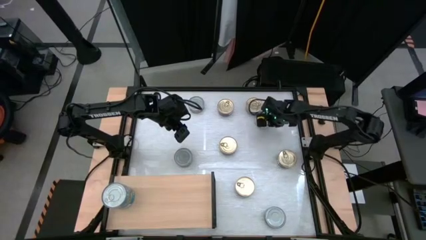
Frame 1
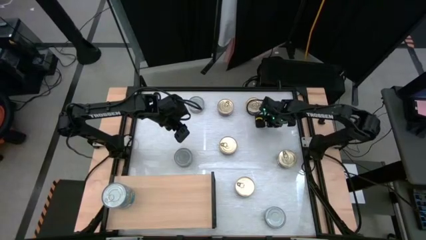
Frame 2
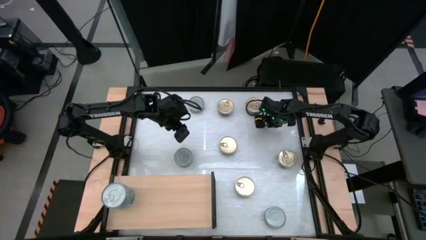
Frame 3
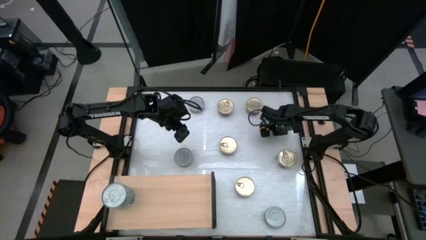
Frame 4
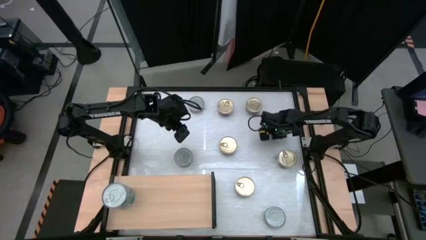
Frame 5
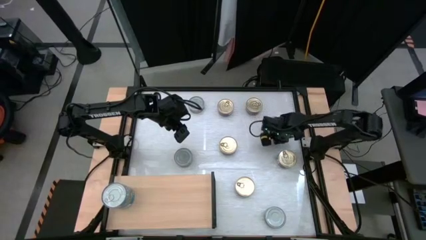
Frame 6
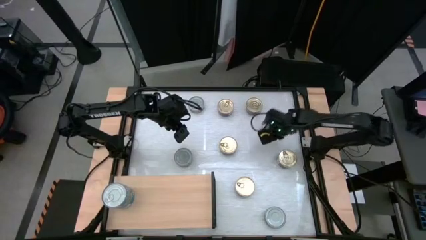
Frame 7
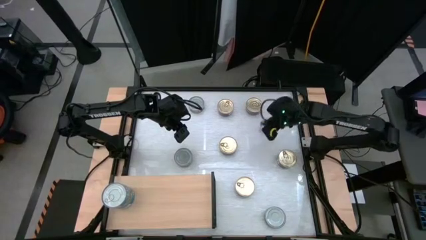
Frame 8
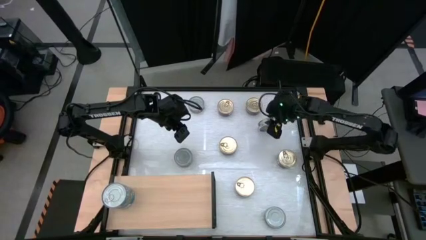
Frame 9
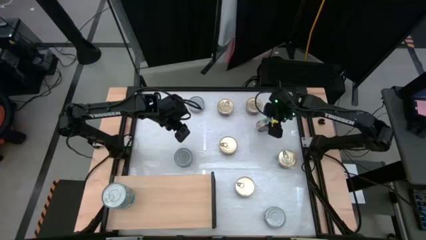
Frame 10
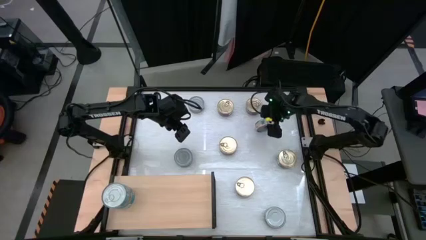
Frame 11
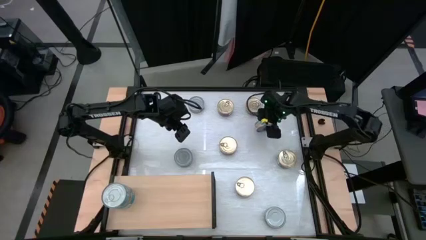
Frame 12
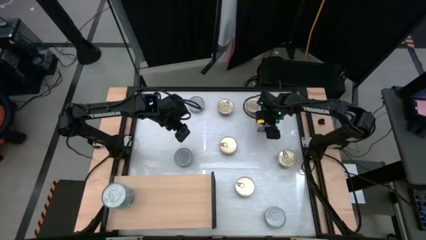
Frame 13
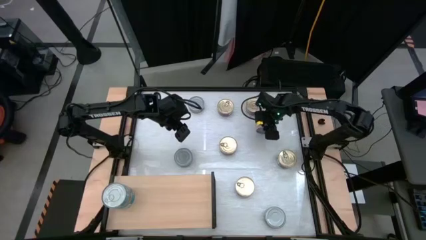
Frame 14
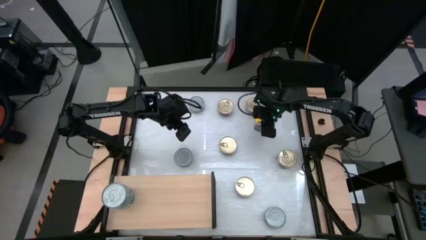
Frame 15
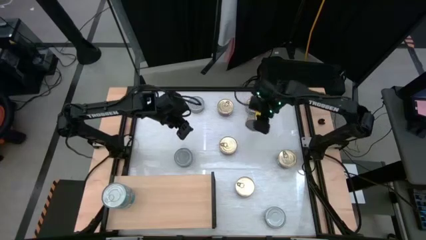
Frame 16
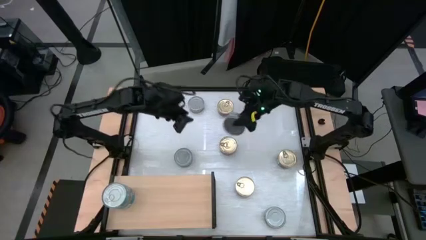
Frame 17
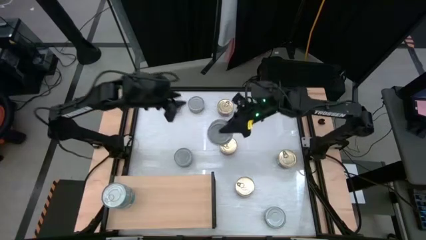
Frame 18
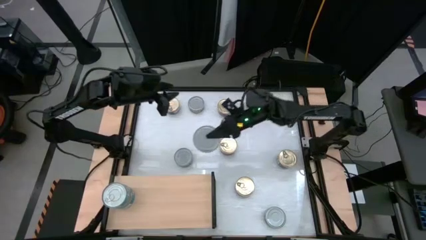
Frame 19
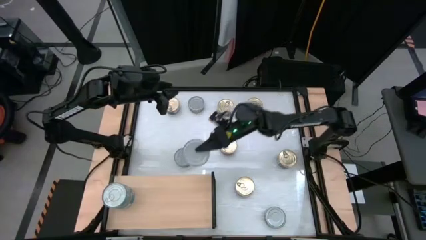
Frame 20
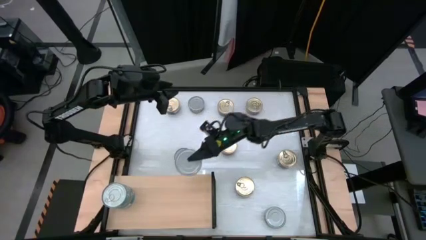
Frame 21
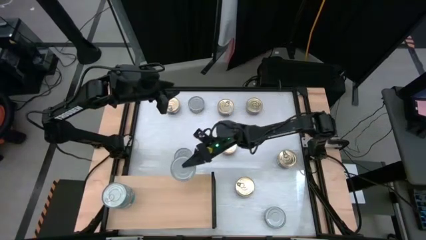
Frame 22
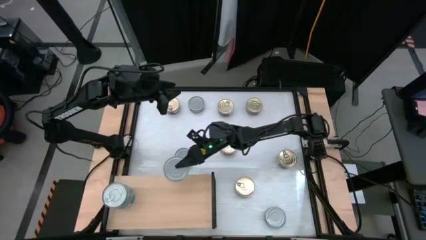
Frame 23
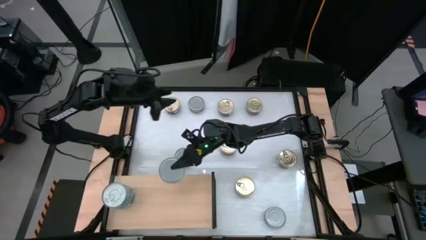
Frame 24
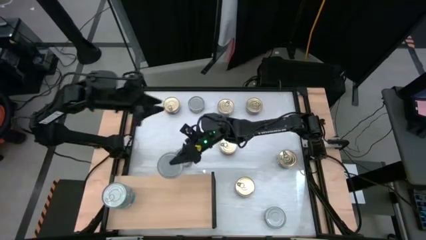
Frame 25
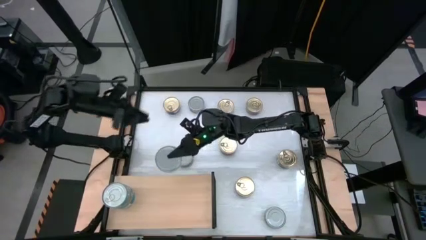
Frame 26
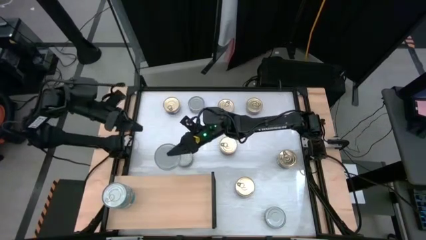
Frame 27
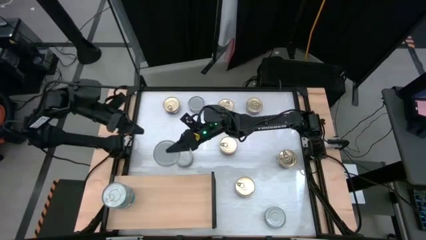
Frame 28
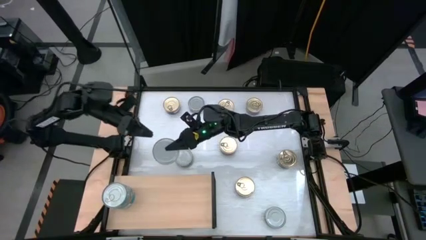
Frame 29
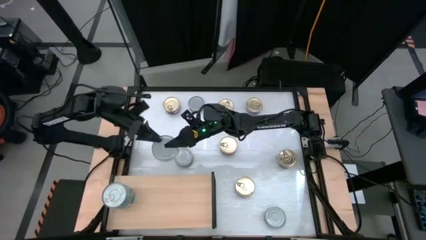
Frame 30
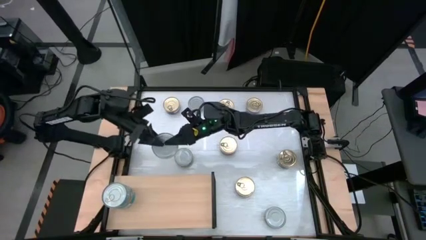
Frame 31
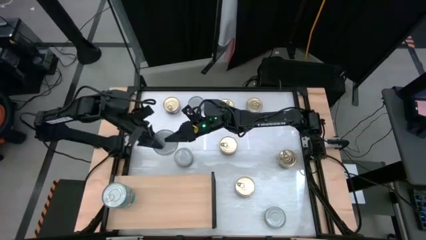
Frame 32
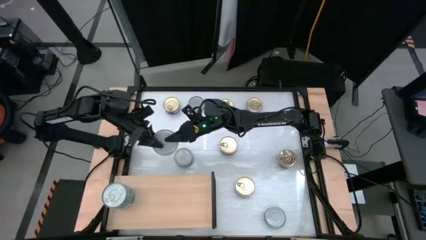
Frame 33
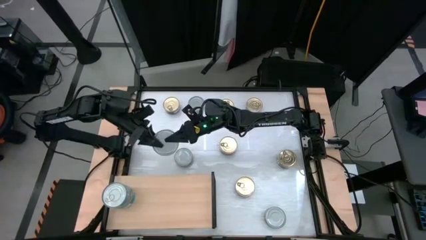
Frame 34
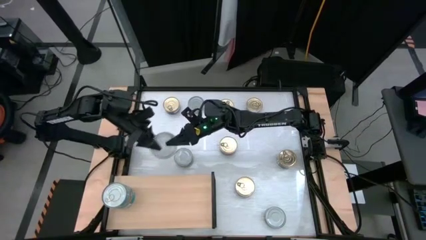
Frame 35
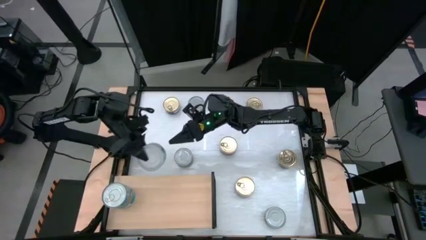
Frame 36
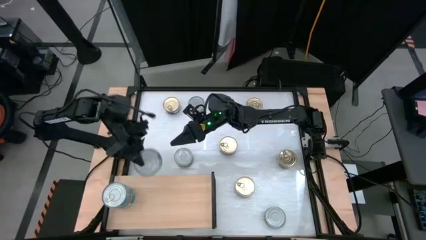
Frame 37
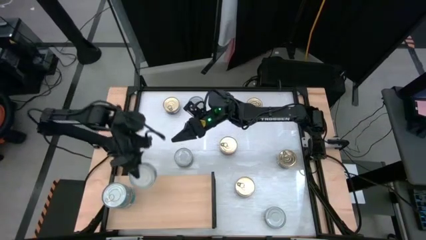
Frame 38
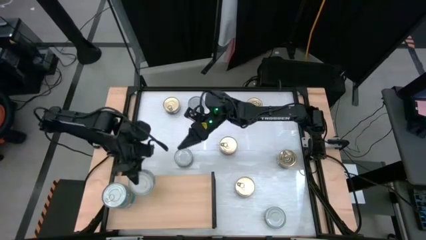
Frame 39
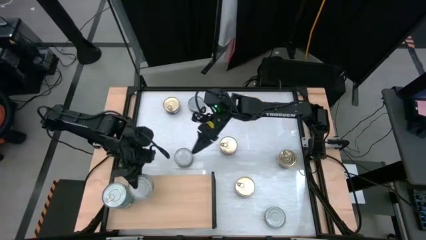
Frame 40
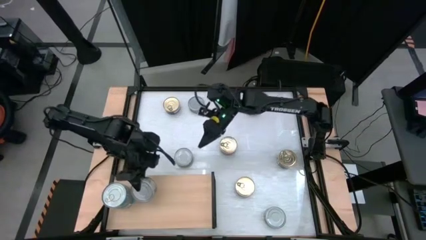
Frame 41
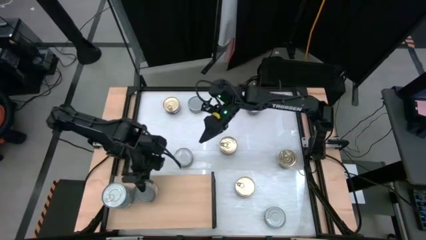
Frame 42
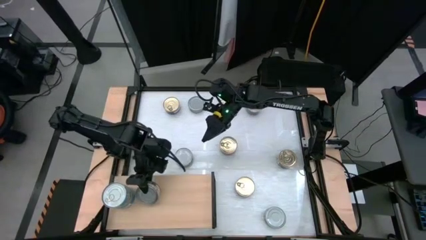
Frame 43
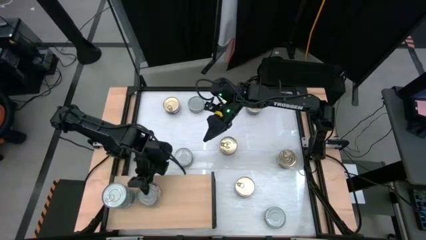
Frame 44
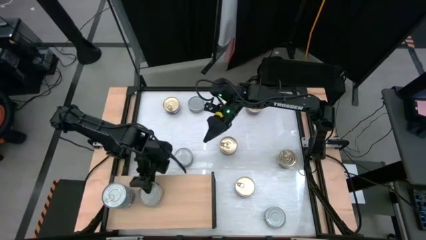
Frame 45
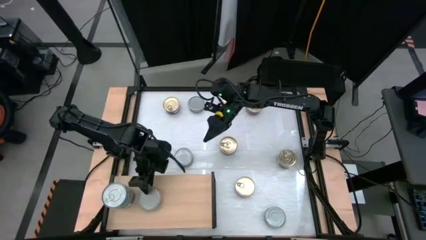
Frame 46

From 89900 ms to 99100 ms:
Task: Stack canned seafood by type on shelf
Put the green tuna can on the shelf

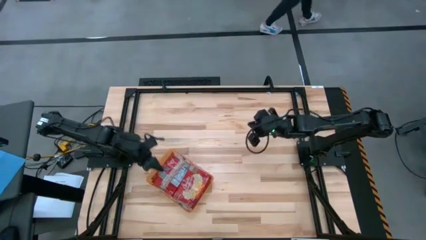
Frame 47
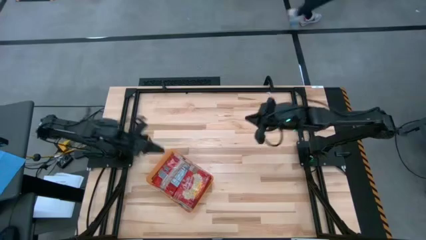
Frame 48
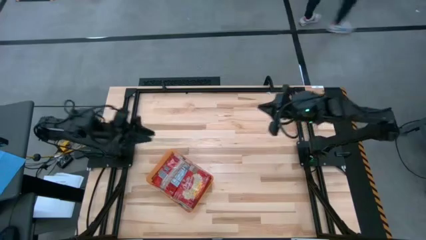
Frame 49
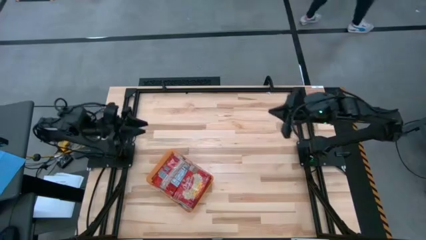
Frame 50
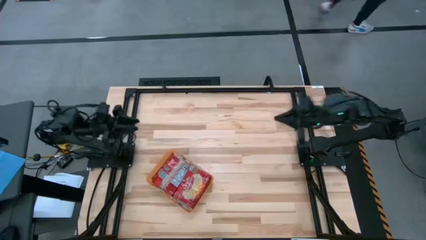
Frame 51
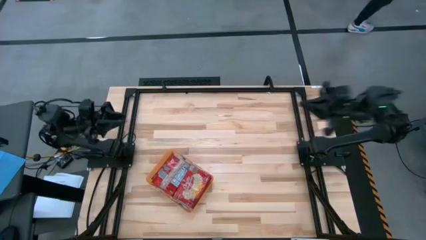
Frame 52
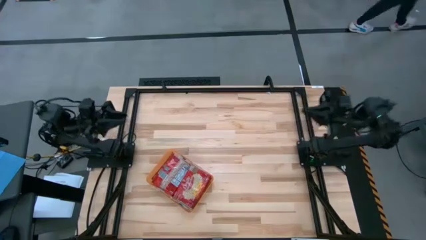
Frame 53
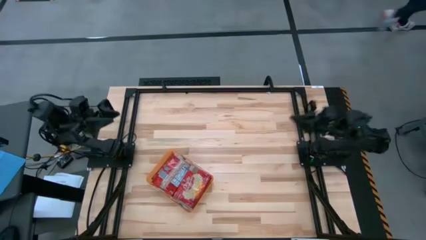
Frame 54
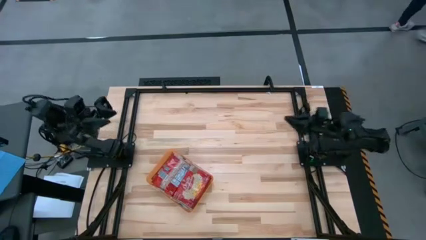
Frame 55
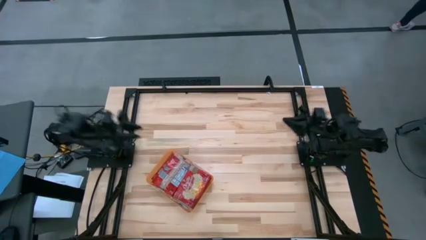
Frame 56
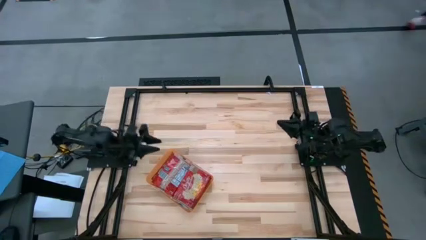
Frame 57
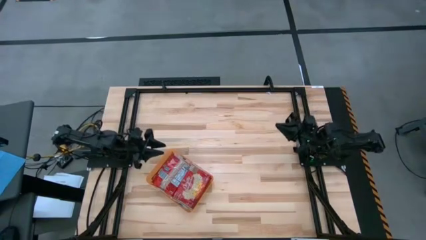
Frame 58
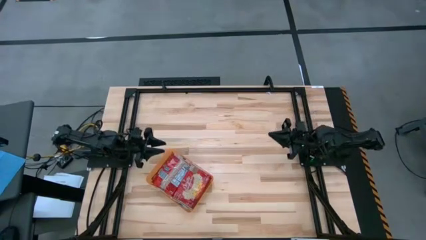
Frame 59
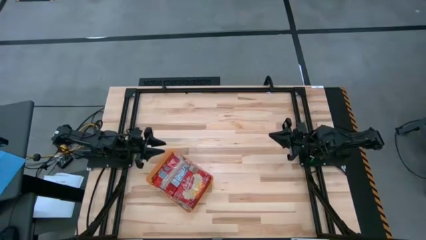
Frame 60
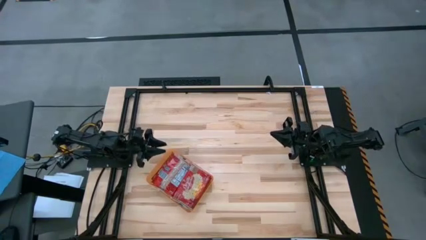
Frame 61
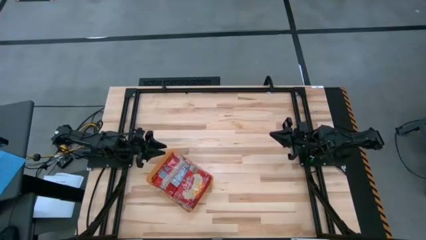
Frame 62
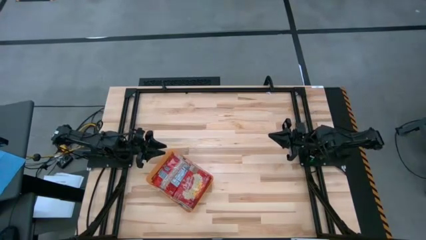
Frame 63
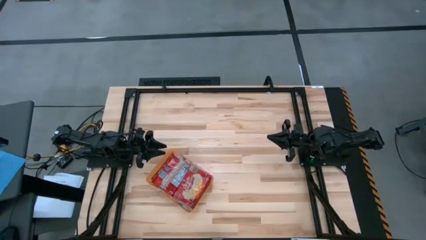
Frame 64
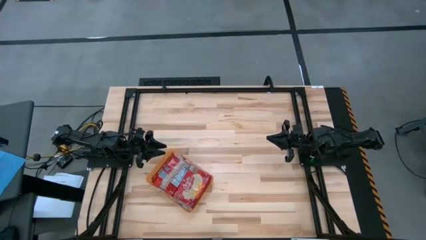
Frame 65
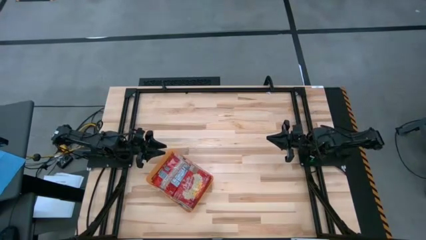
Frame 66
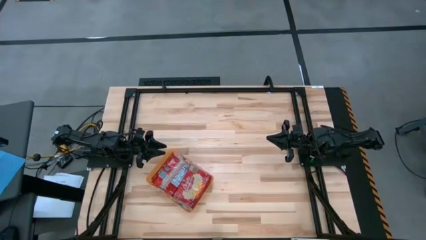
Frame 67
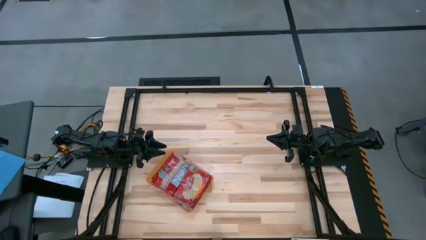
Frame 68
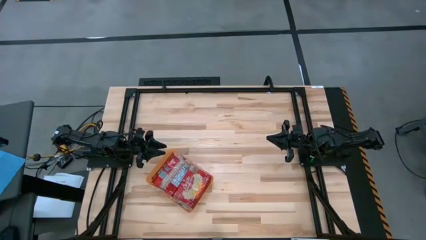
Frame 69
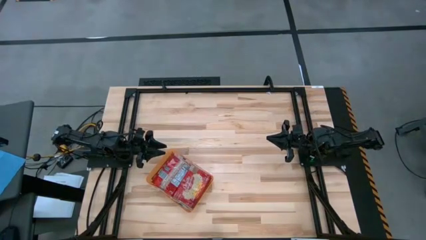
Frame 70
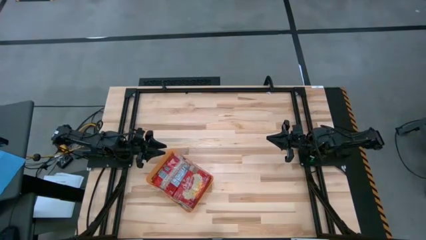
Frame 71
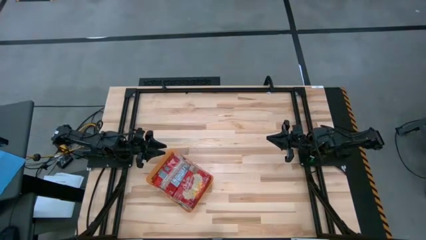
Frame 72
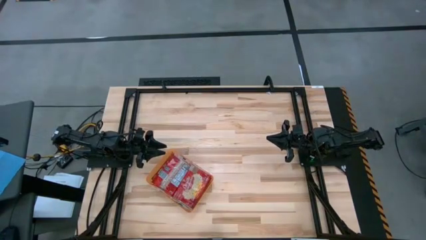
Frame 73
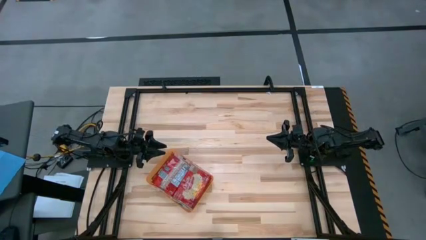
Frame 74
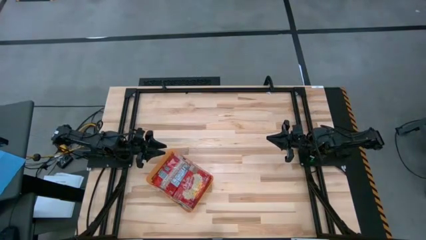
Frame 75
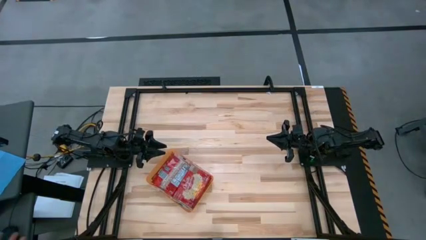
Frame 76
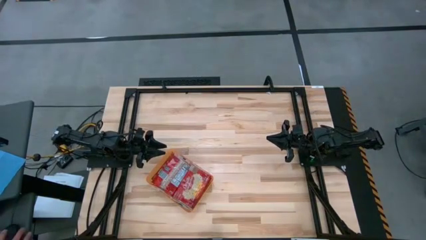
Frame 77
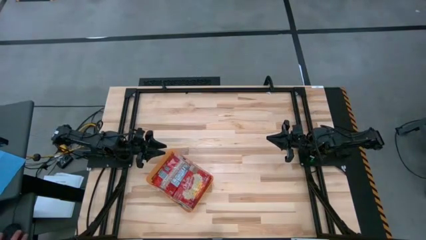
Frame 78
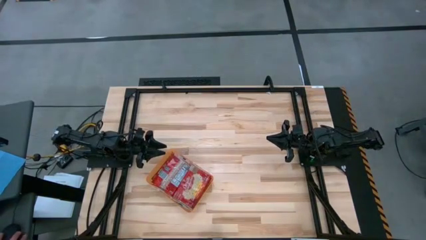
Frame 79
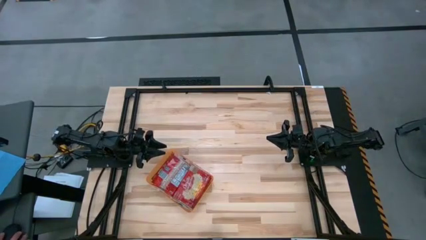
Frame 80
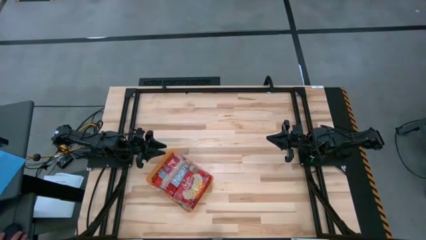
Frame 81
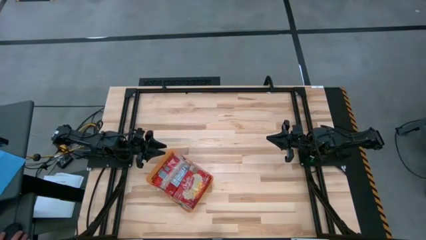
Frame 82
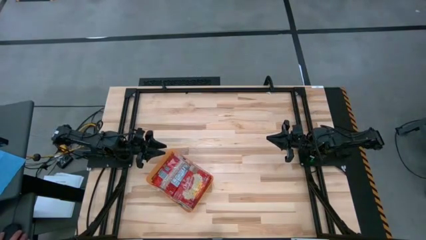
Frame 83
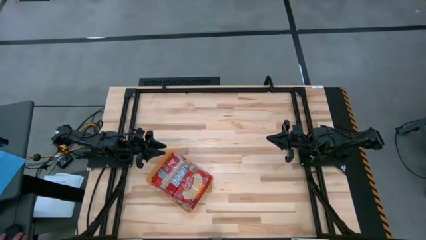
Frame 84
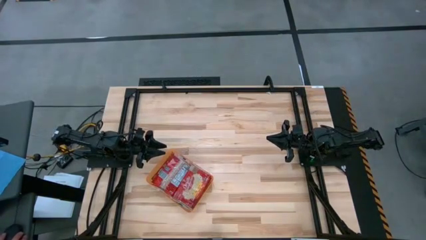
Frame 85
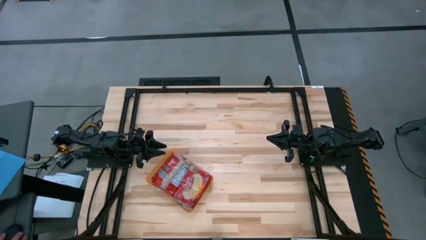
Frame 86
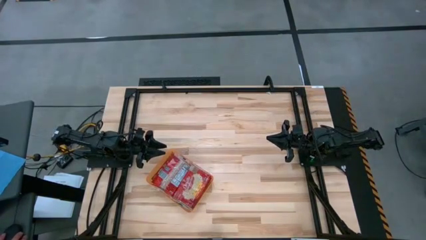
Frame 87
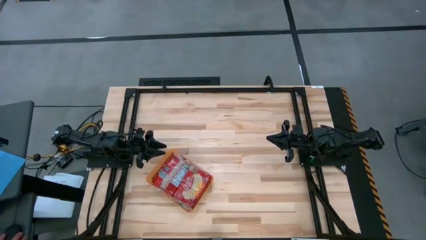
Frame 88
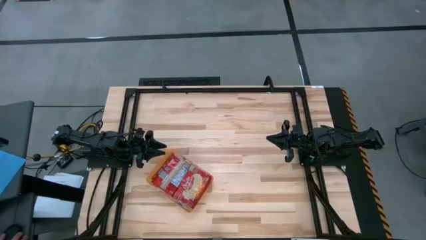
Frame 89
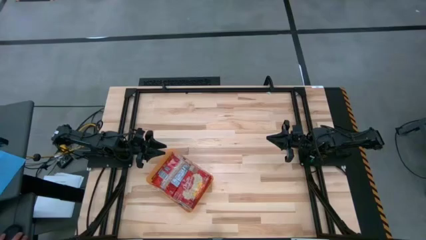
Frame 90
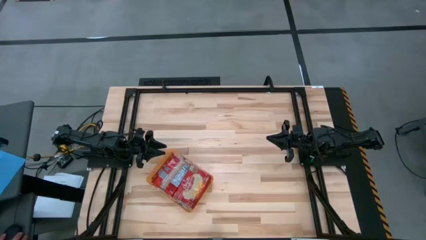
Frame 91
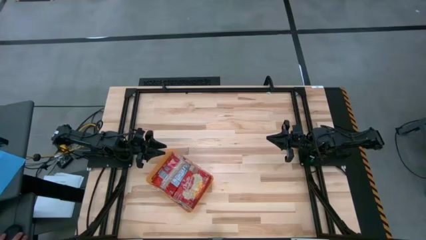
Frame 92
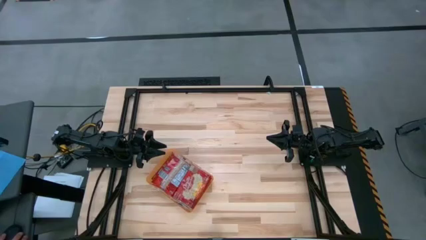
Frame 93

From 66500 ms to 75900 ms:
Task: Sort popcorn bags into baskets
Return to Home Position
